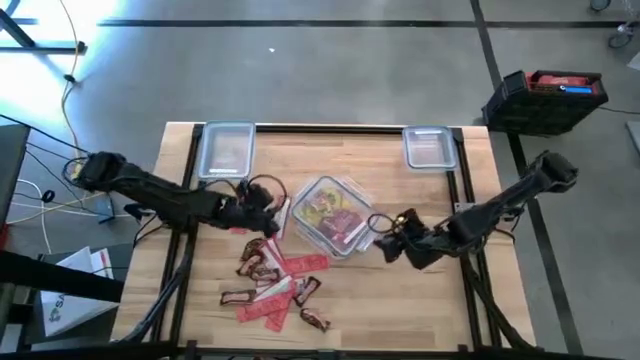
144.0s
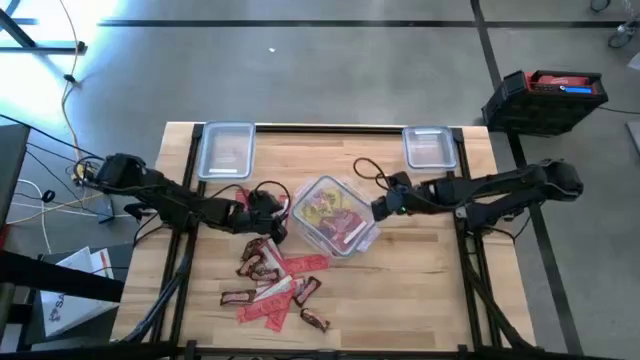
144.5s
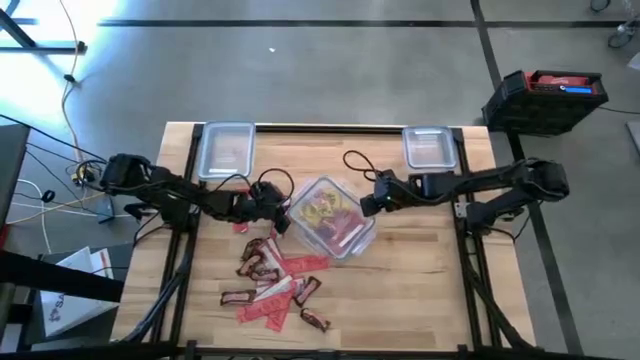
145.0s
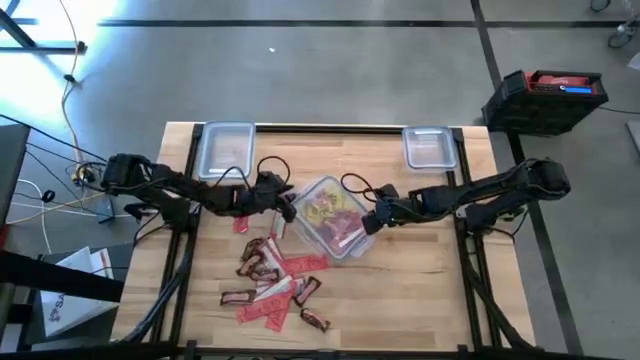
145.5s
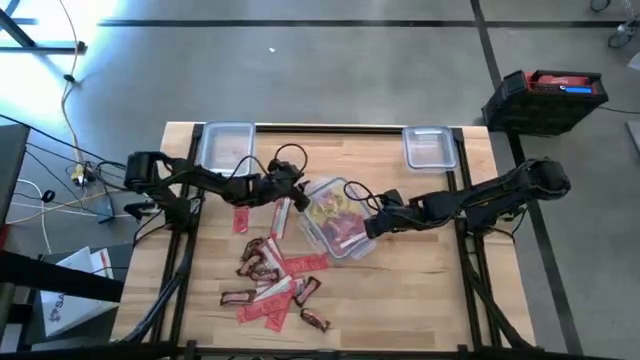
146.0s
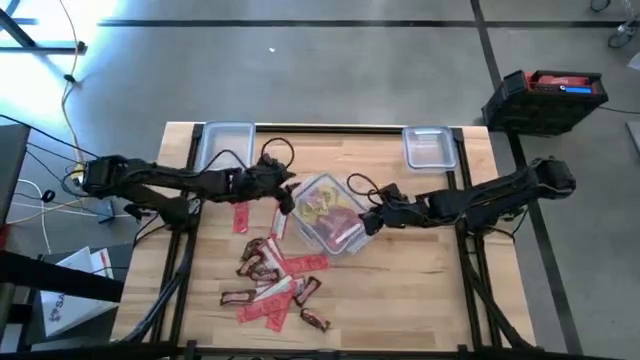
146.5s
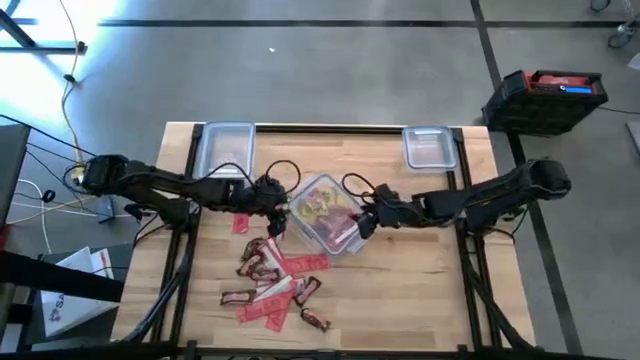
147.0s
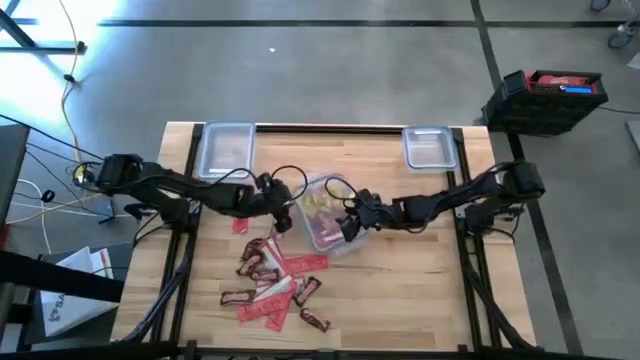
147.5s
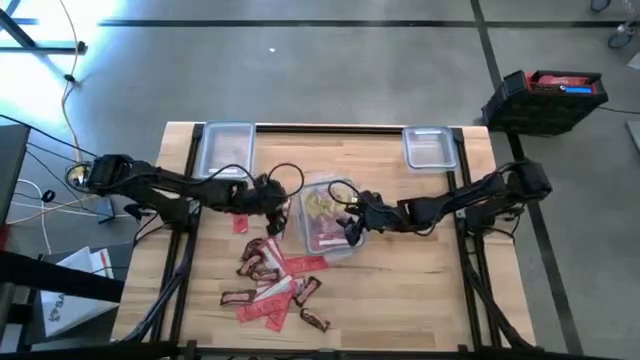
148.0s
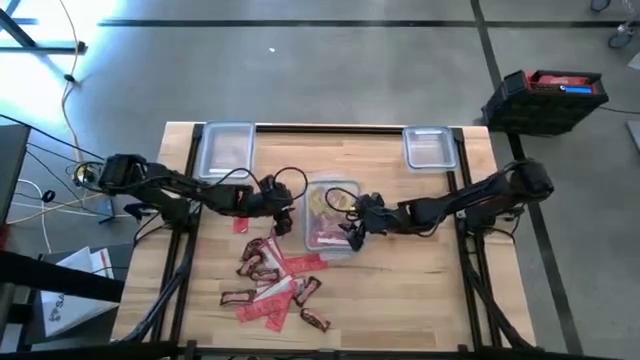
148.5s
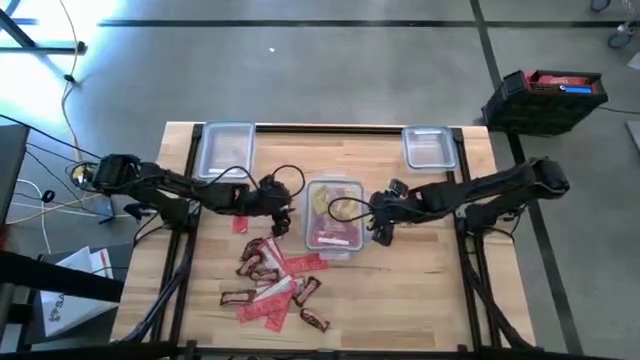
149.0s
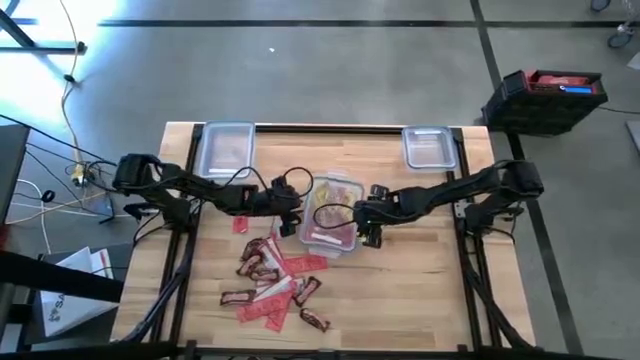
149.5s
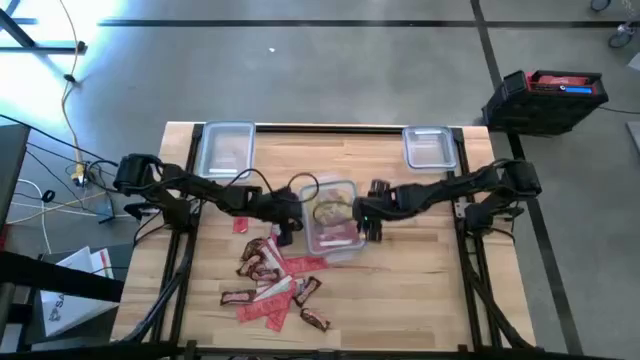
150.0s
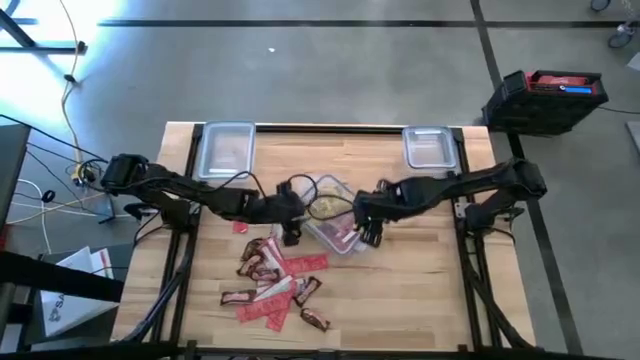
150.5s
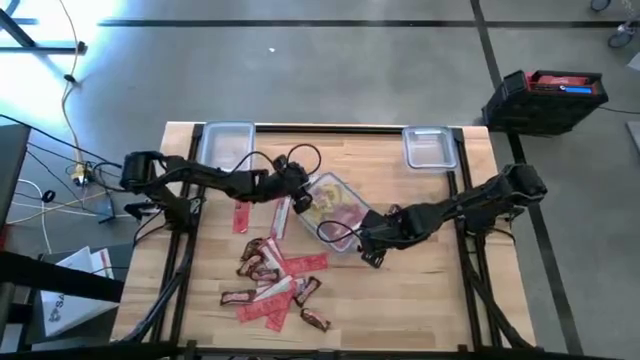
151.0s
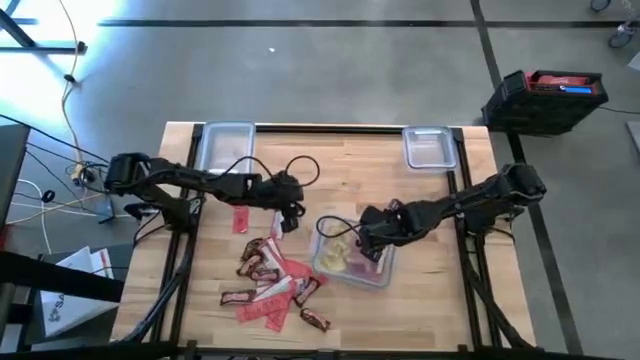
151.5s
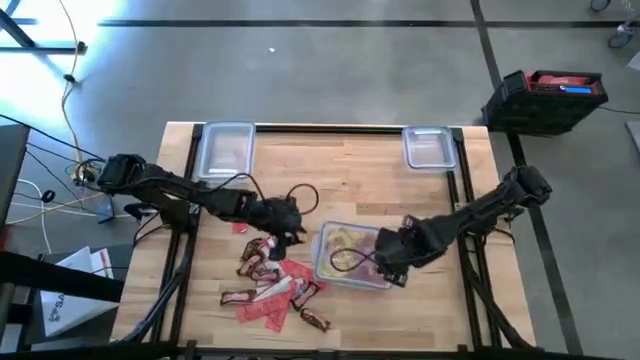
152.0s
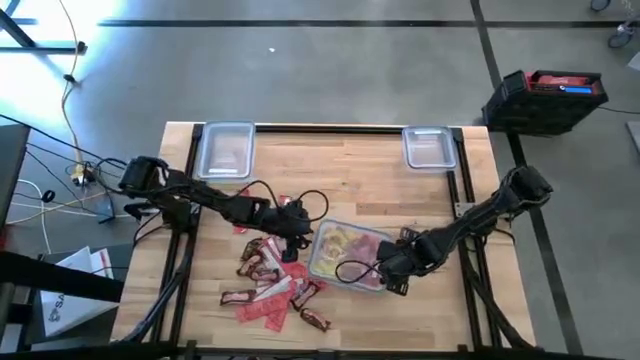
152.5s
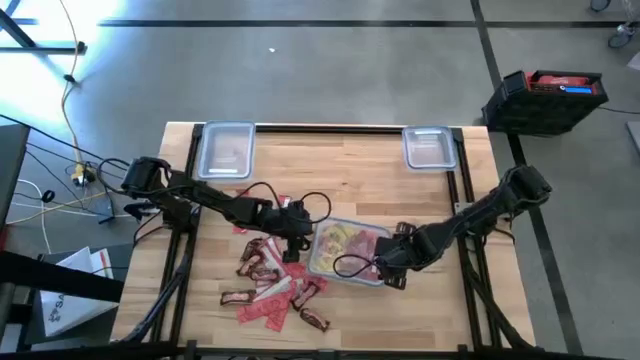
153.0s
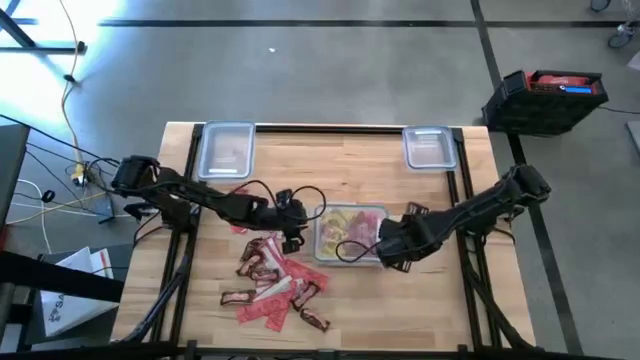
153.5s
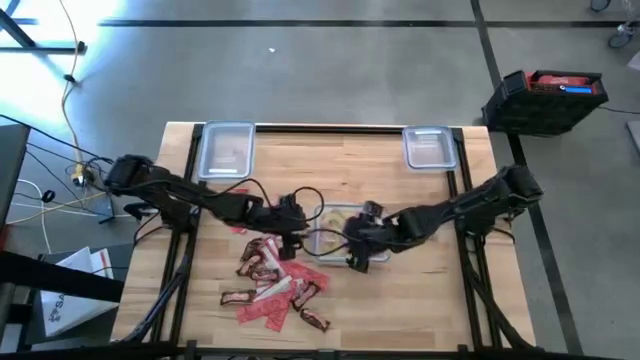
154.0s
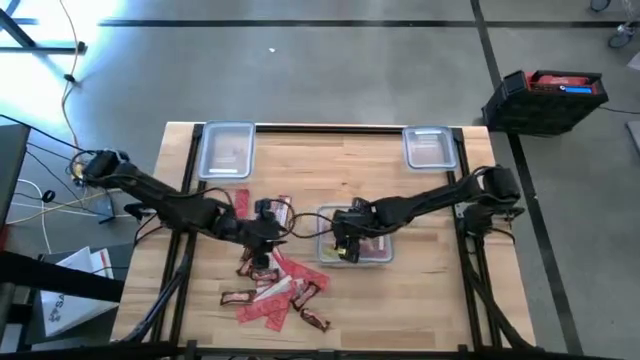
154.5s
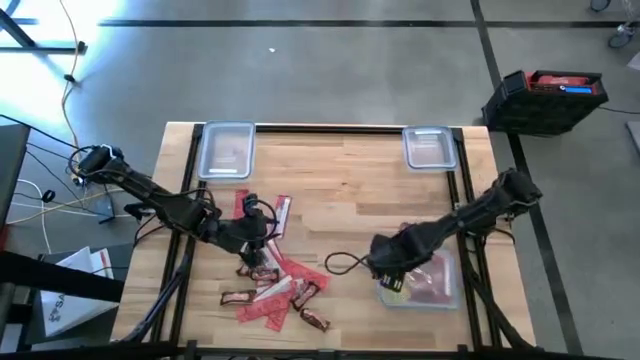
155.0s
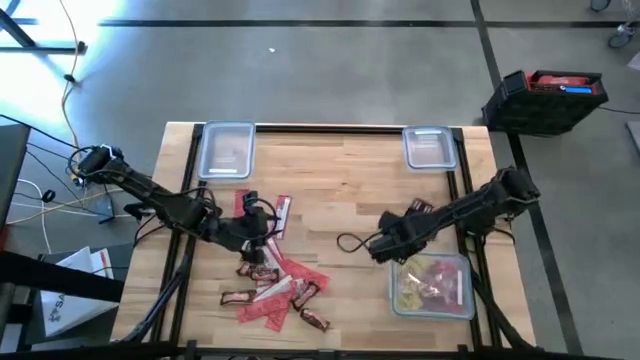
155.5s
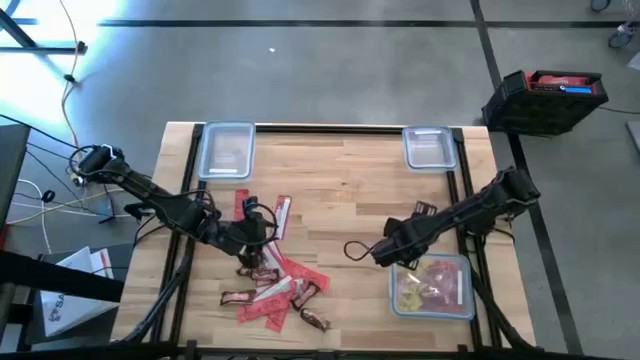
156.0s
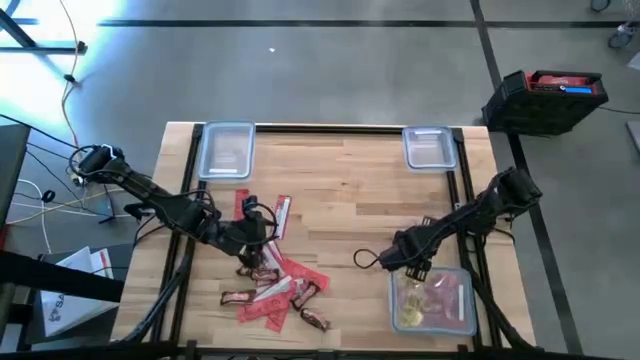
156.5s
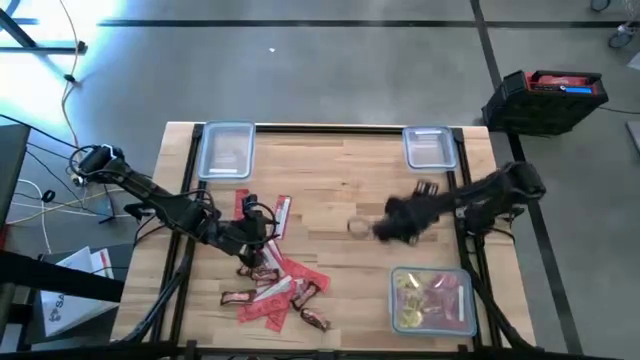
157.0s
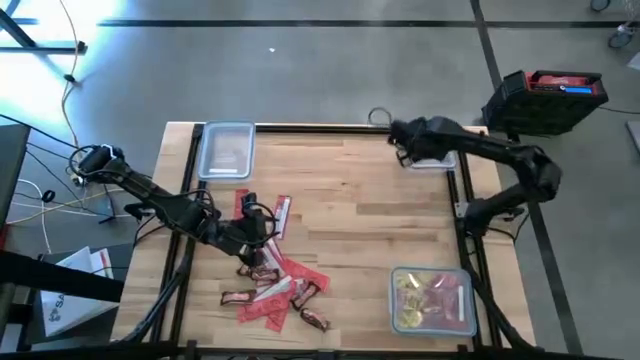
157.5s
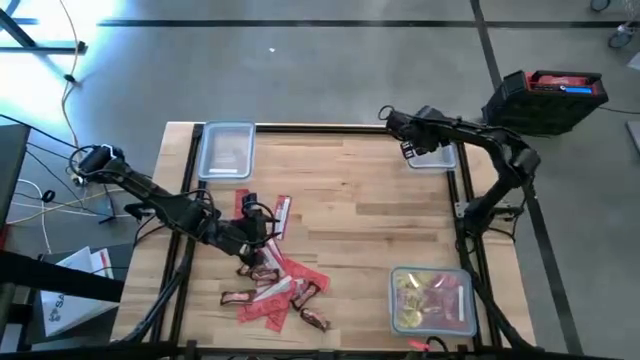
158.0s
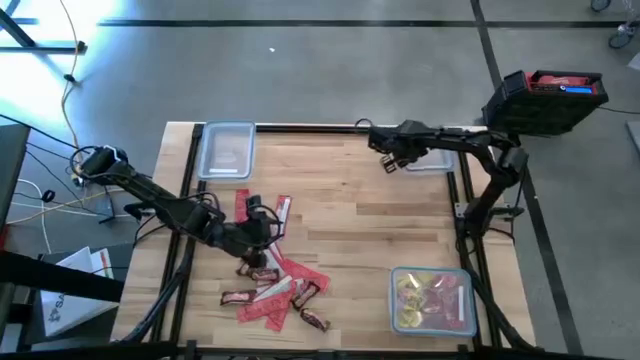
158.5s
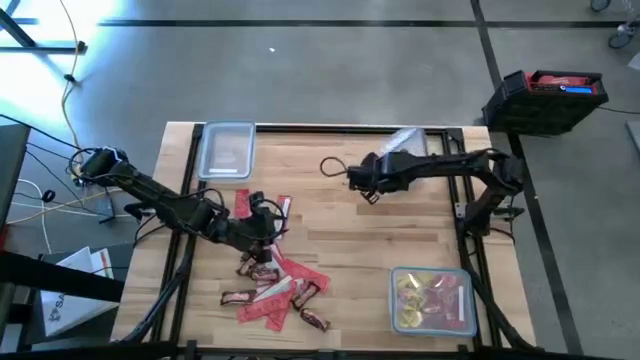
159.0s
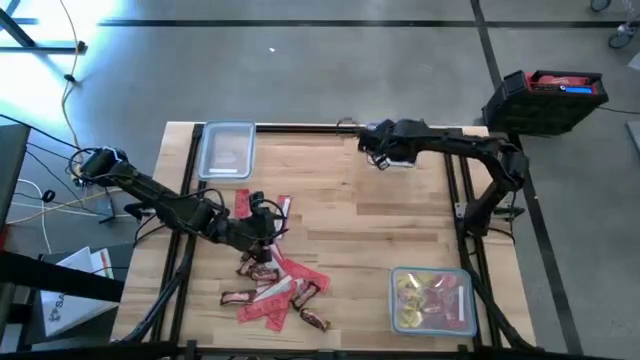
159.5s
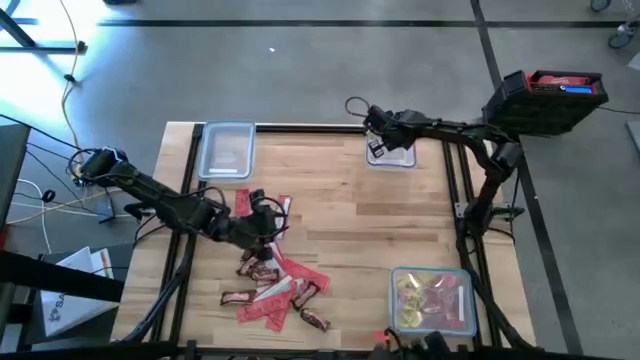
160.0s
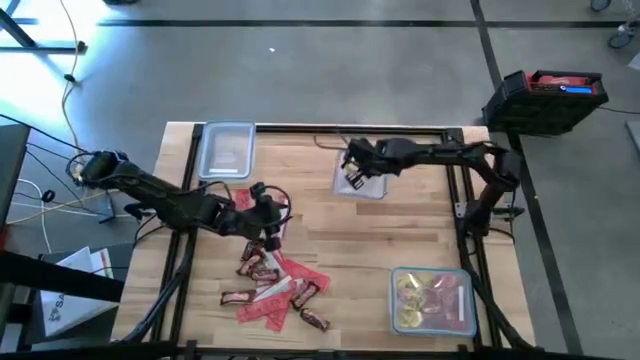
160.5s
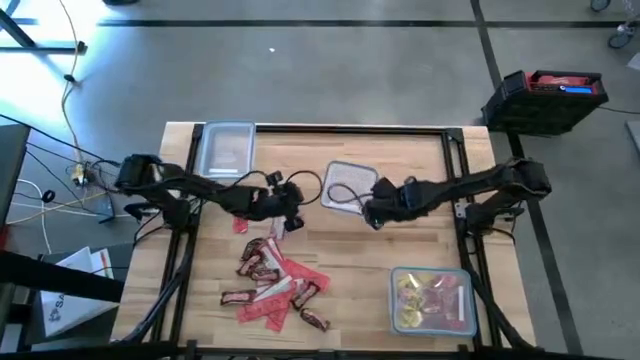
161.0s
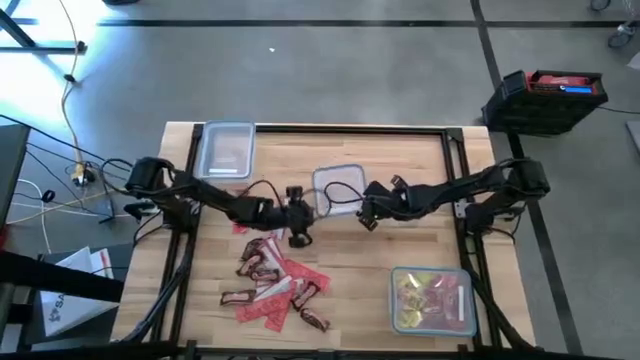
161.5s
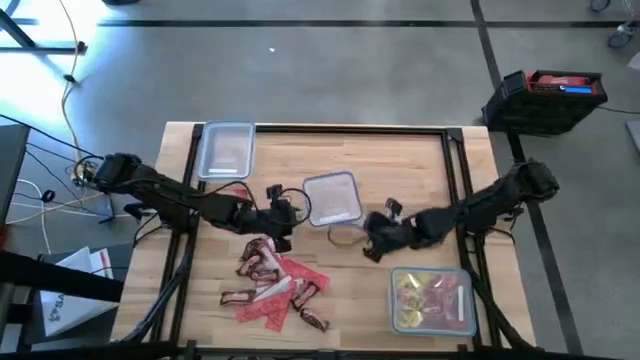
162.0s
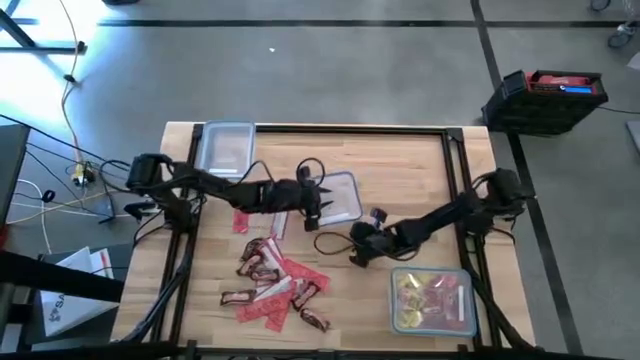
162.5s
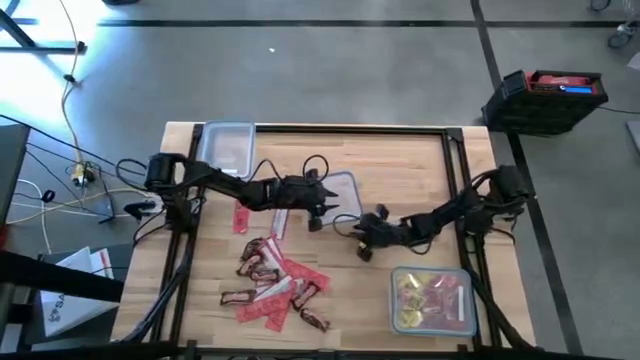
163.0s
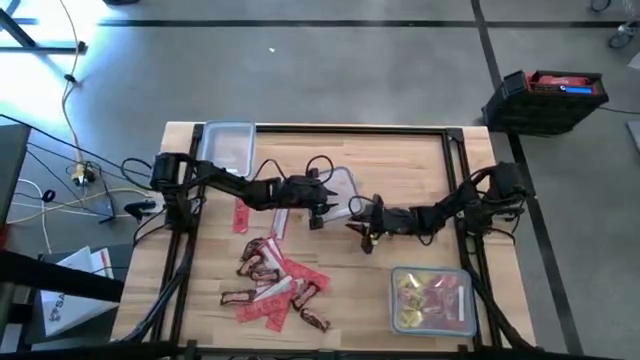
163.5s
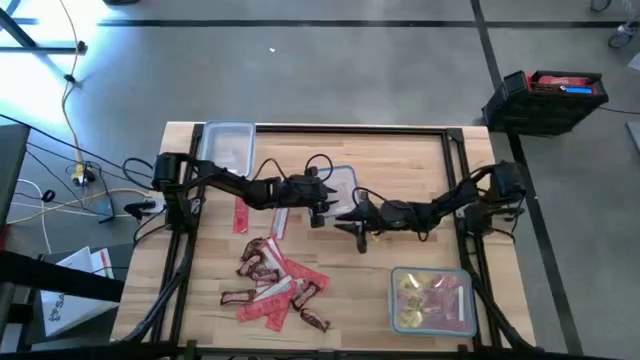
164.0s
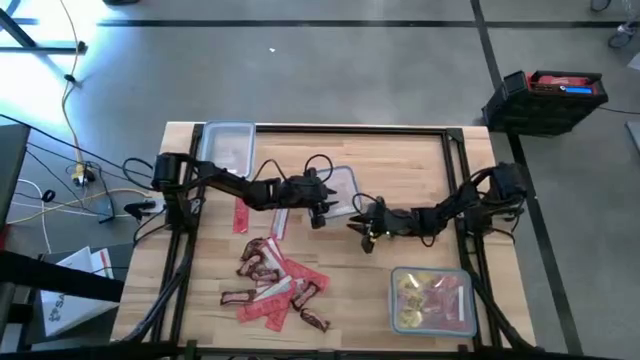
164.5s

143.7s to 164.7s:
Task: Sort candy
Open the transparent bin

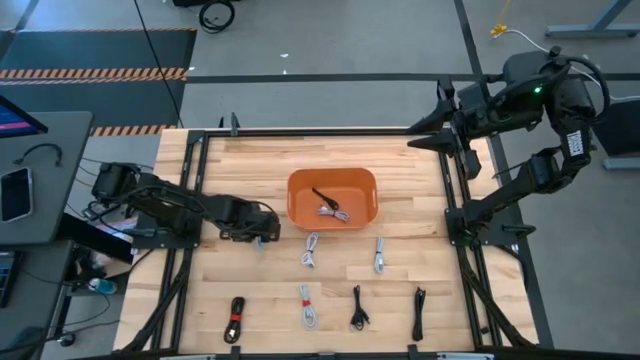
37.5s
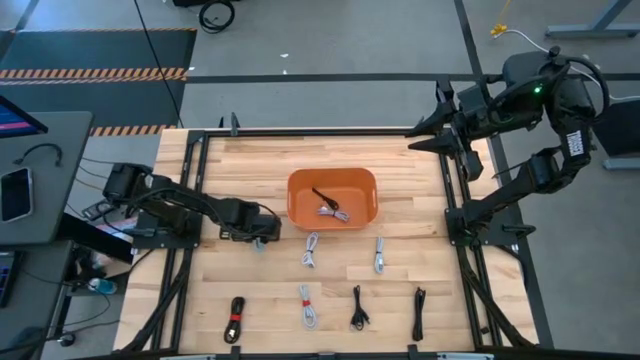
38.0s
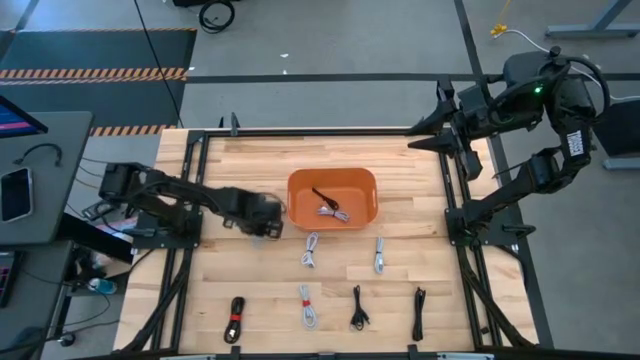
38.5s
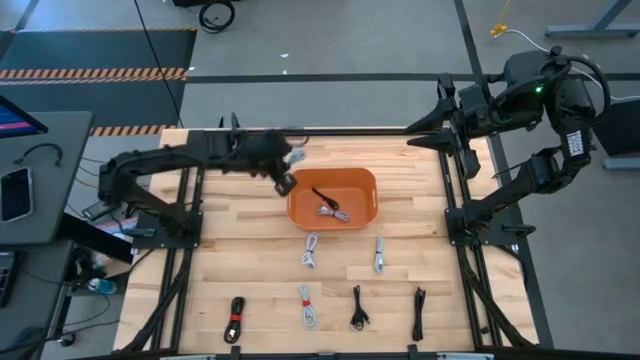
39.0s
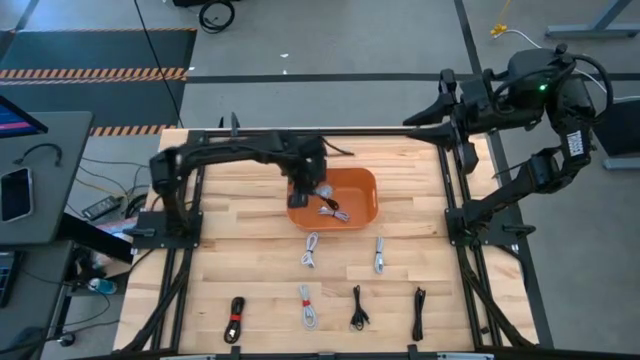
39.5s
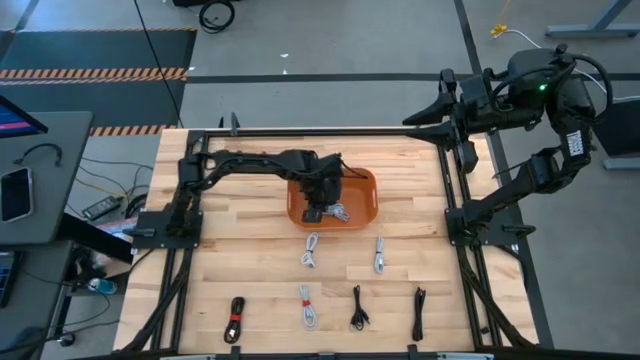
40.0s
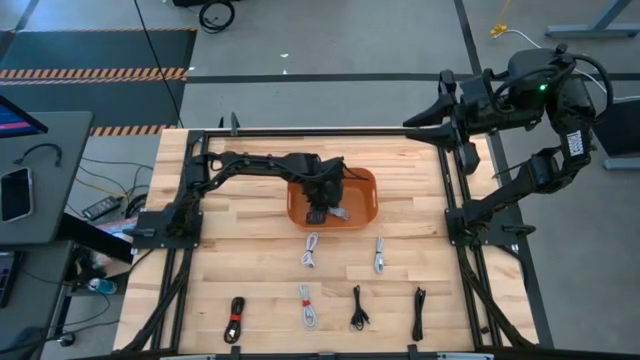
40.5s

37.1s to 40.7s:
Task: Pick and place USB-C Cables
Put the blue USB cable into the orange bin
